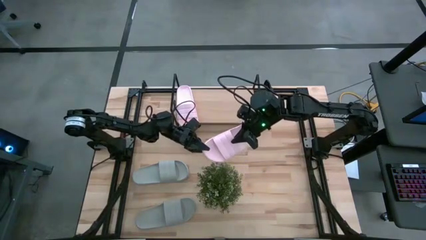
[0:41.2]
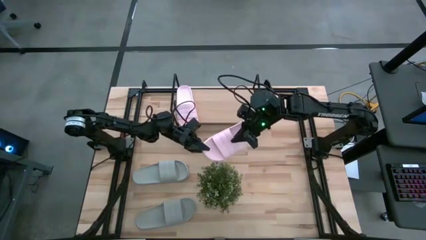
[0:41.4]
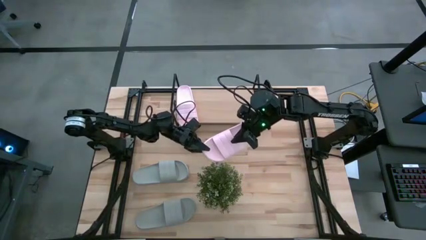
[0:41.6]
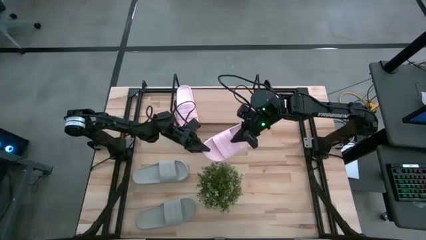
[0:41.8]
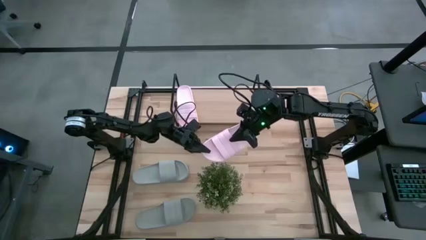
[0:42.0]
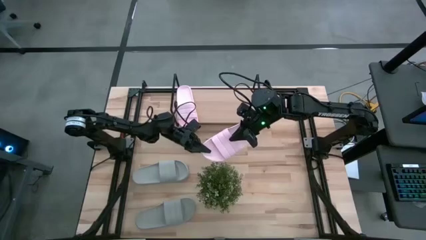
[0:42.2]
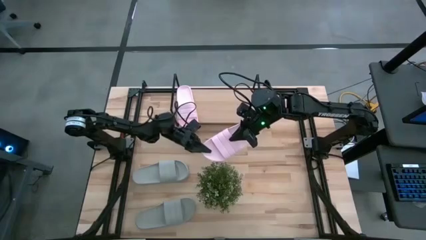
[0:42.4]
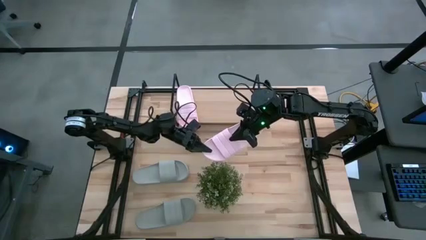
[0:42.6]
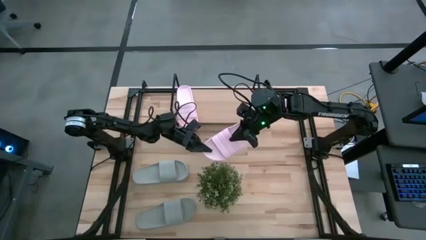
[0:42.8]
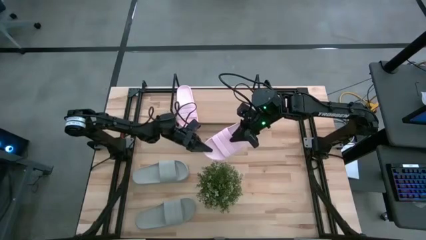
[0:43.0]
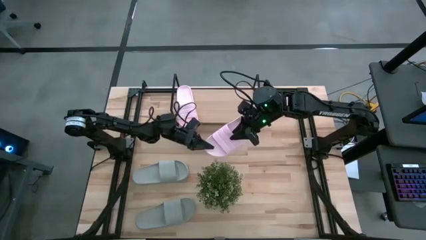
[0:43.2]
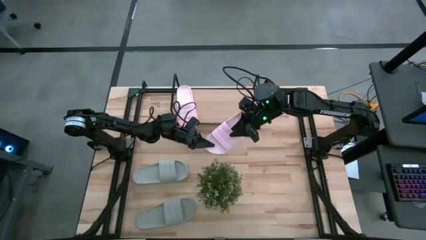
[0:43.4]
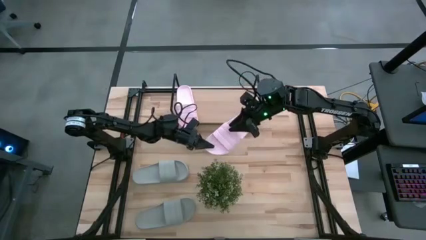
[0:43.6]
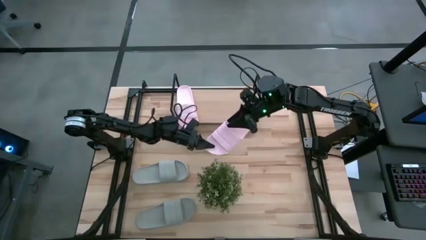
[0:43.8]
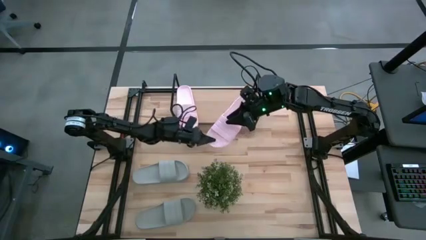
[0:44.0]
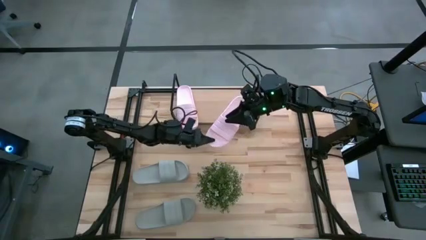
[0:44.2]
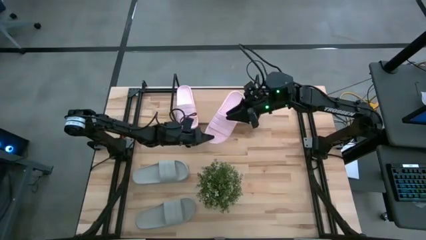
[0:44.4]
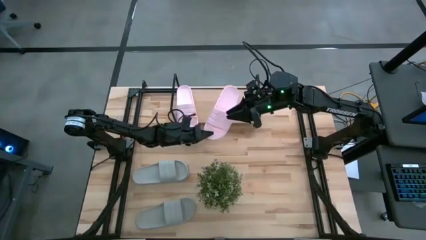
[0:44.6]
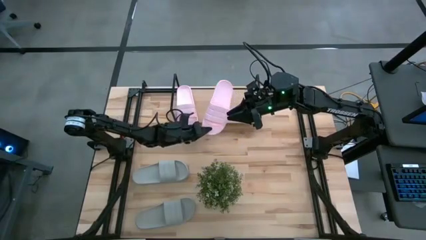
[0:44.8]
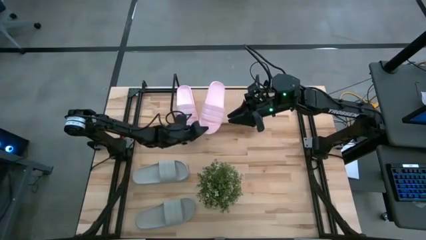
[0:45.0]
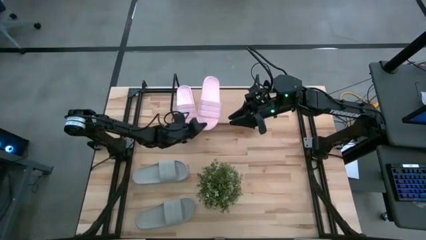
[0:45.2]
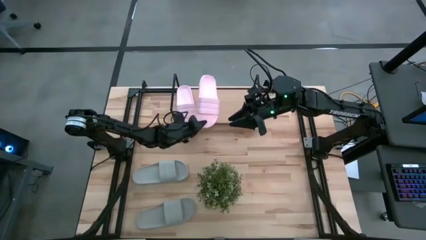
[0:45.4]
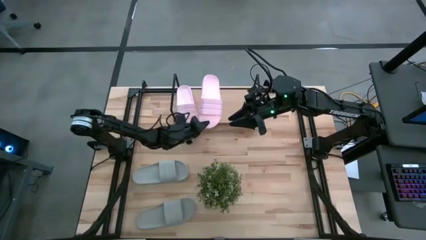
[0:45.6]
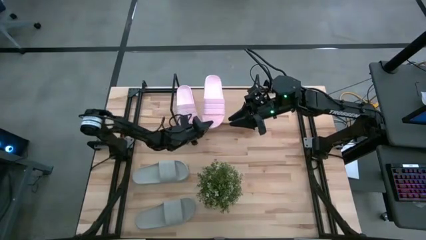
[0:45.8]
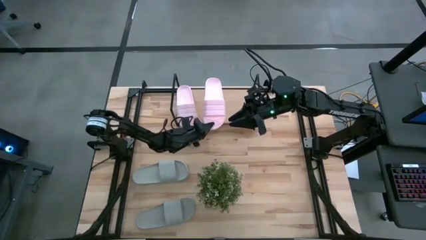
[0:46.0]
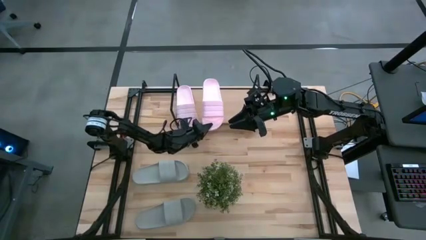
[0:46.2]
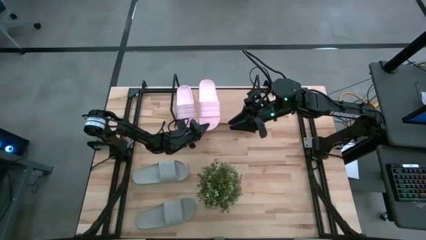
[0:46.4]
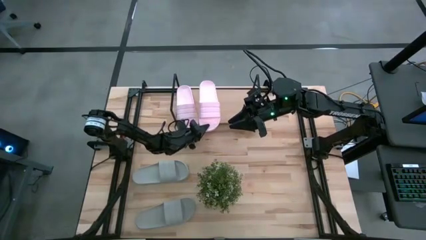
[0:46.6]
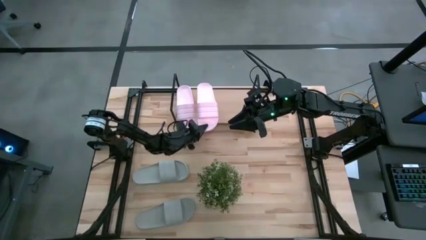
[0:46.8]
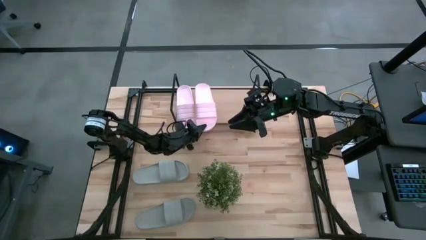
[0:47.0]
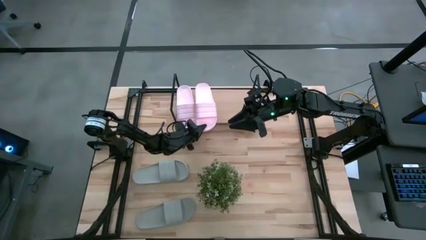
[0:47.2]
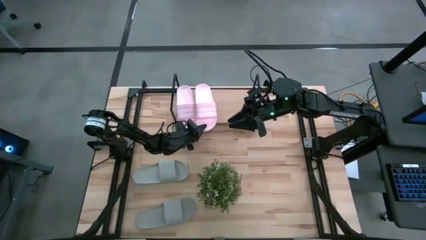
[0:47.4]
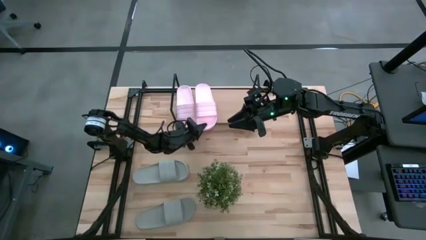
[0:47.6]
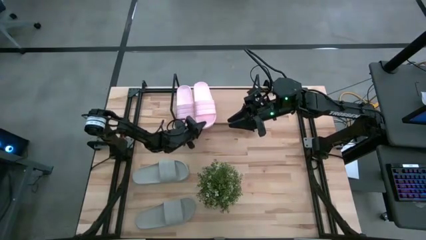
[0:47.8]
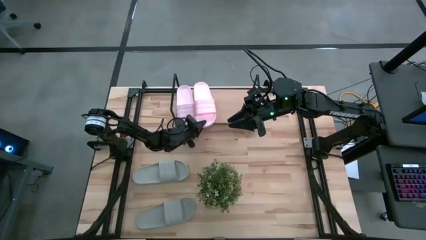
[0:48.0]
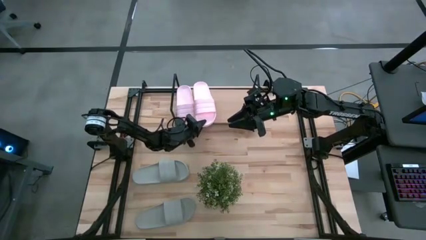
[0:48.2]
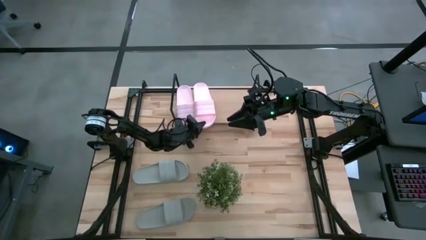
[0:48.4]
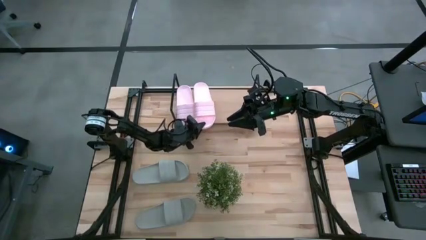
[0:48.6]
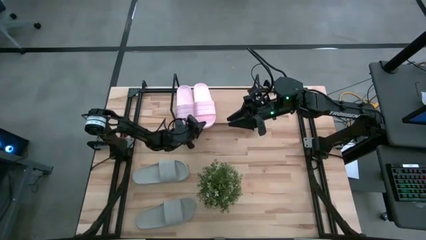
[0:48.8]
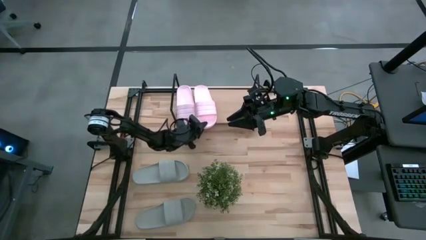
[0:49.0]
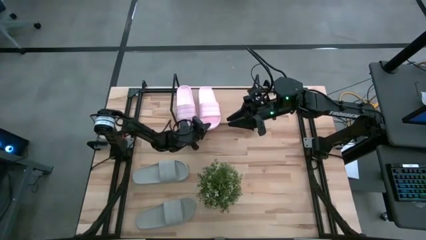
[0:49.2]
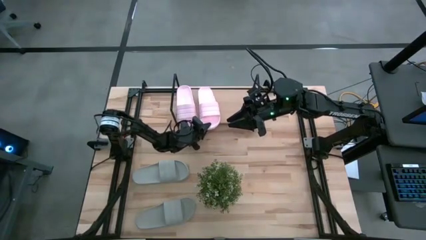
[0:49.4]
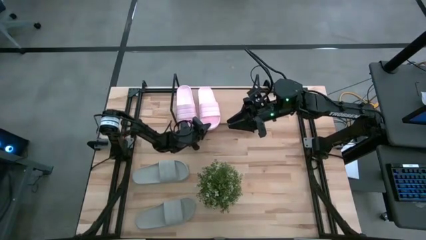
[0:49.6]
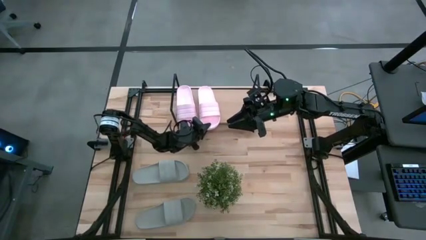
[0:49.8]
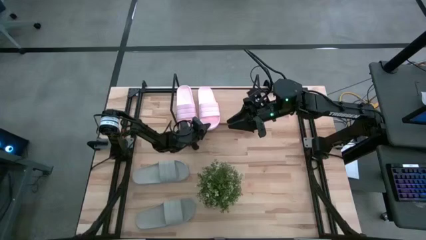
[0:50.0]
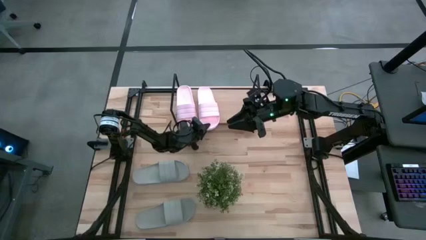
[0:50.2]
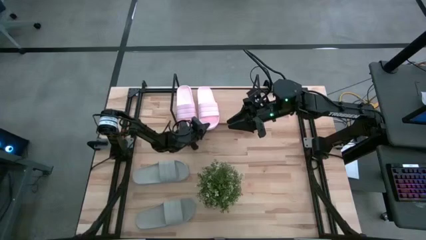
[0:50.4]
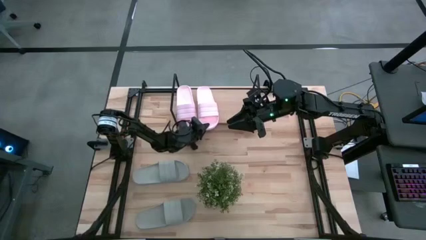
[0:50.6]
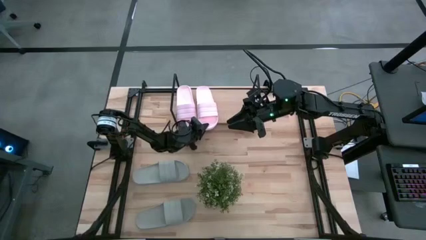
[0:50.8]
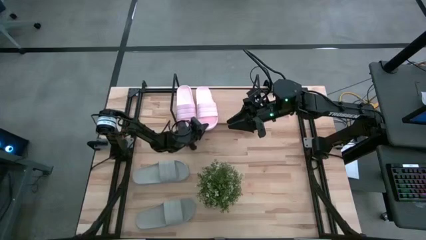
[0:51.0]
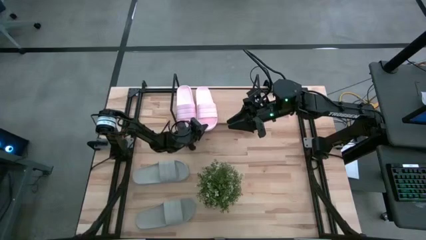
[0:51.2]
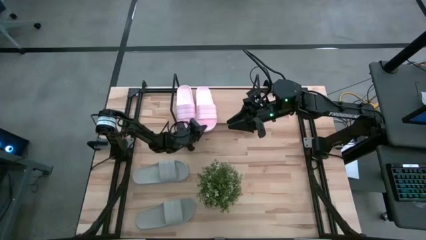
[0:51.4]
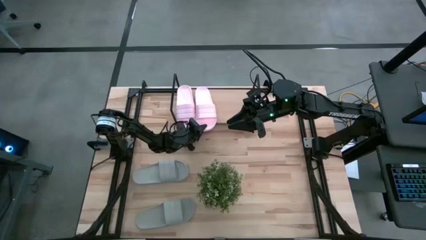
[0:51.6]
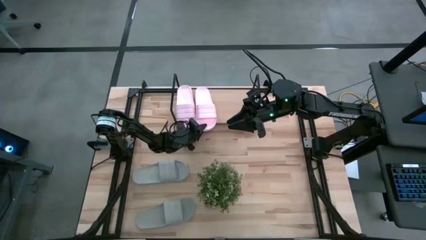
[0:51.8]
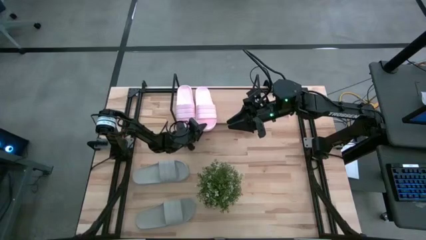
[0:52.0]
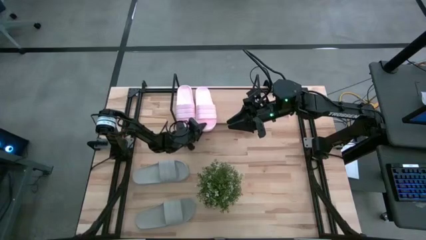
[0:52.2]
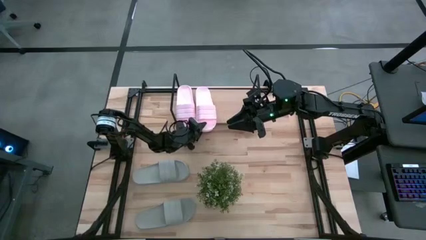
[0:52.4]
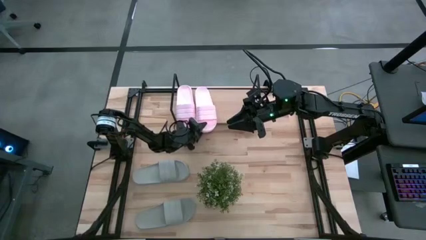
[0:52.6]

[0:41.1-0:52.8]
Task: Pick and place slides into the shelf
Put the pink slide on the shelf

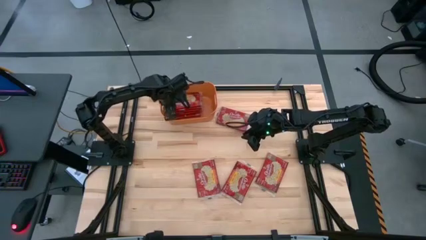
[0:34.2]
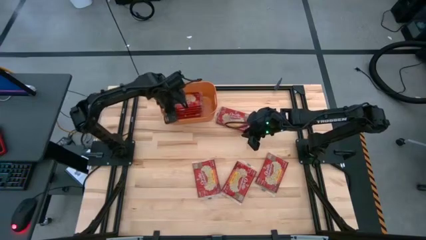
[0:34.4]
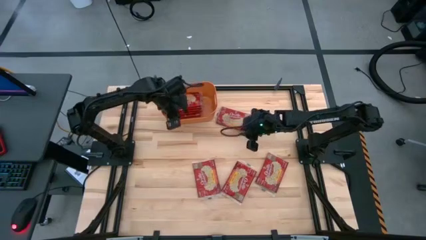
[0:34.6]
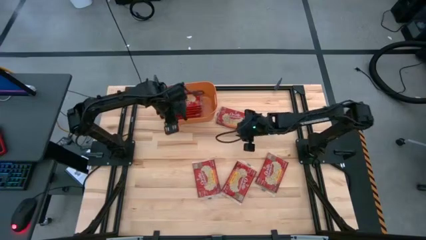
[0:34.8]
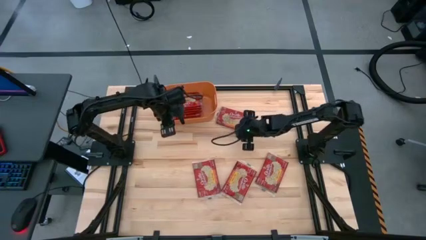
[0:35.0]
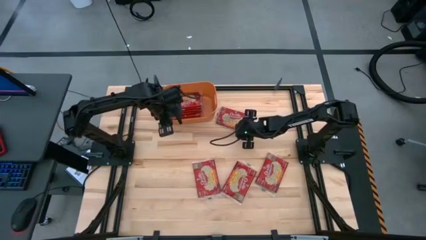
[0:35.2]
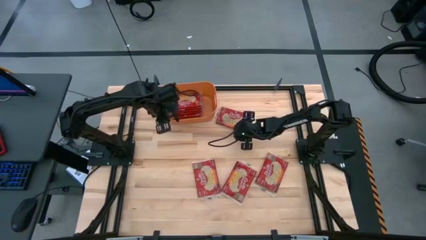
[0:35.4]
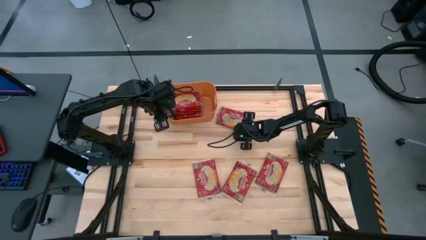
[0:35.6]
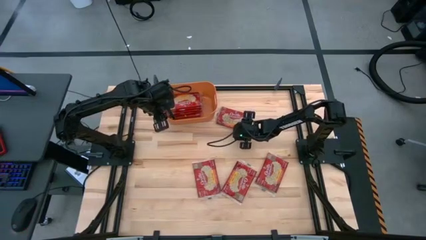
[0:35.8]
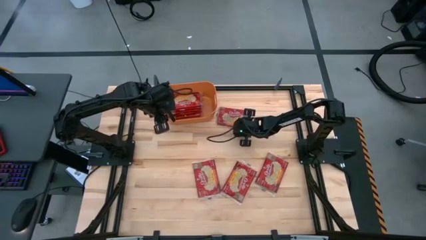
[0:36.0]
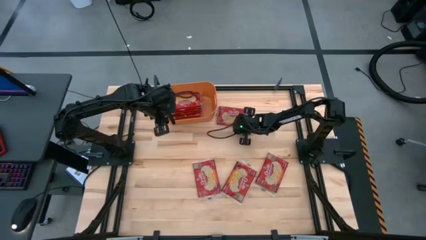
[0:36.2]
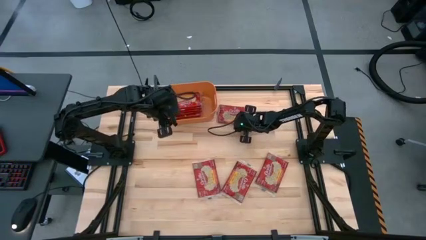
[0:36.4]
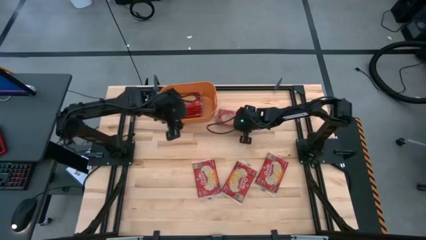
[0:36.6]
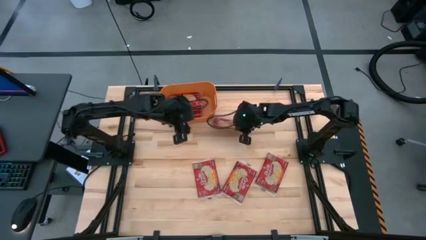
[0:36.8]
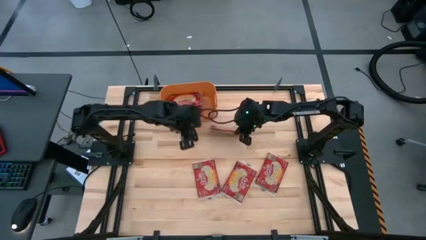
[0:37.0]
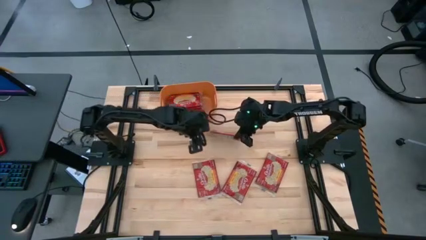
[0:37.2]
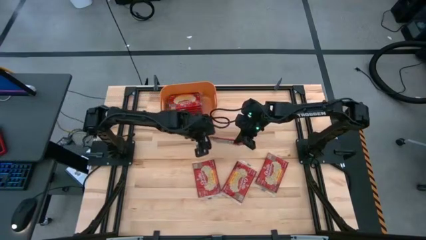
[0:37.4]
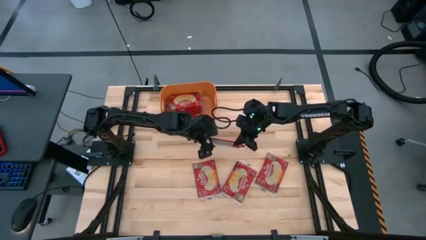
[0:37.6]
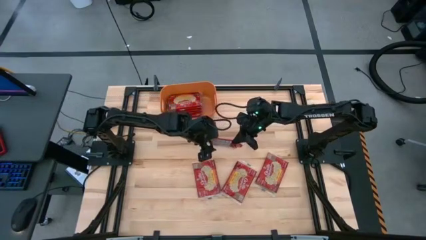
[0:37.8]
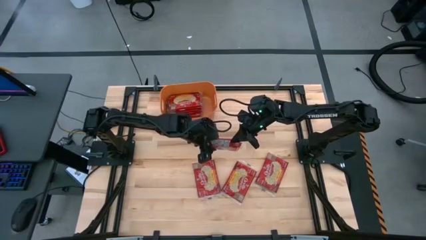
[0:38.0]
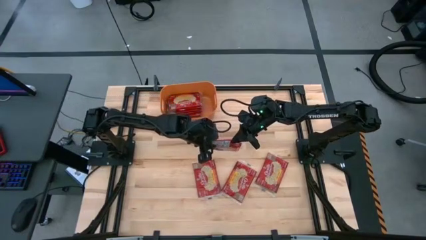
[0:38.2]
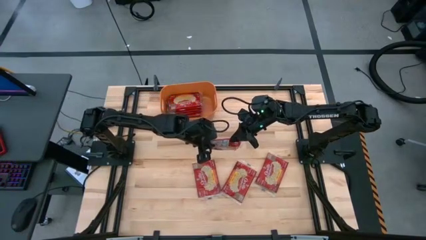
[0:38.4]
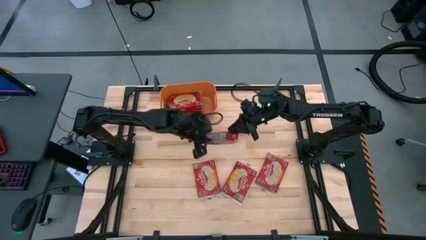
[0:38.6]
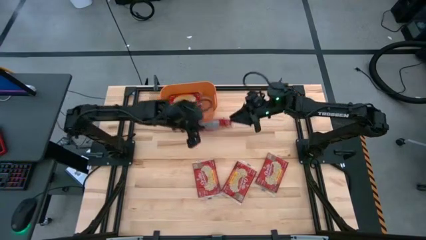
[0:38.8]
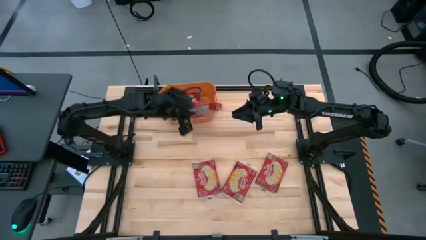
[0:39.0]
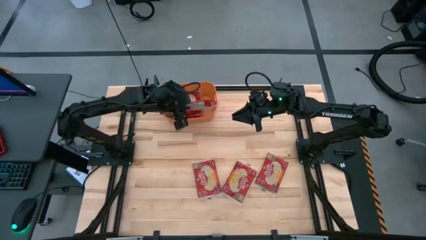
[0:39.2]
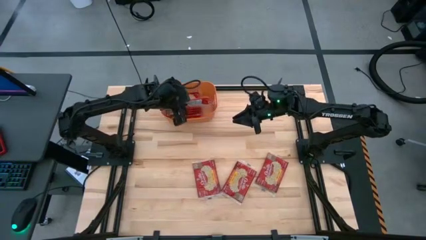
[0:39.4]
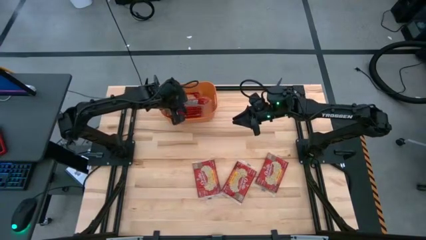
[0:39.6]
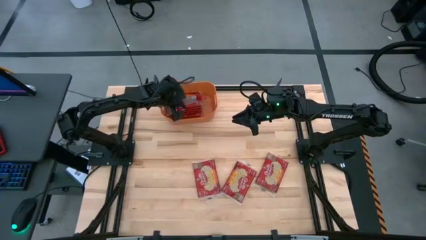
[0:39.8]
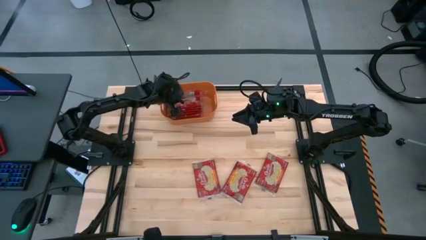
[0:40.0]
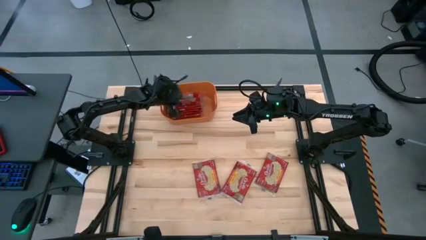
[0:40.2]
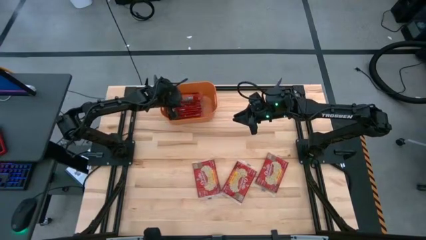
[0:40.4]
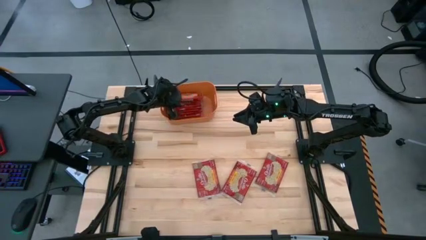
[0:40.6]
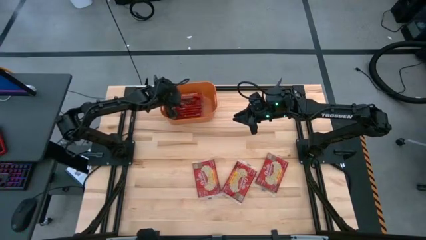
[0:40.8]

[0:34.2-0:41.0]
Task: Sort popcorn bags into baskets
Put the red popcorn bag into the orange bin
